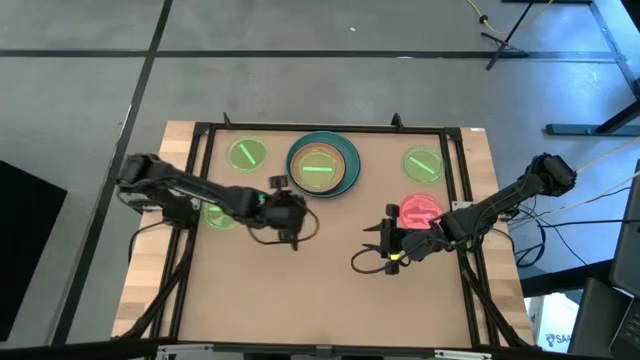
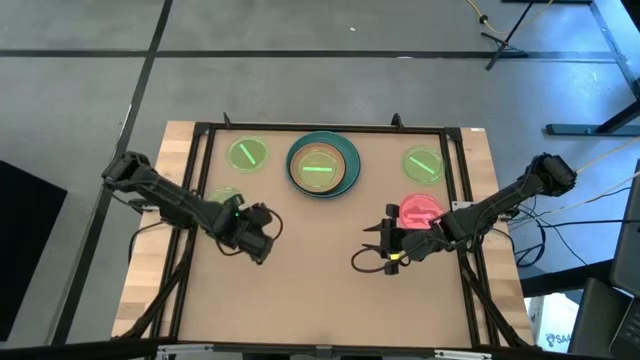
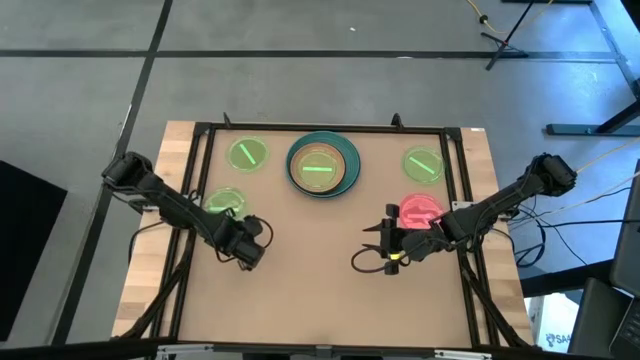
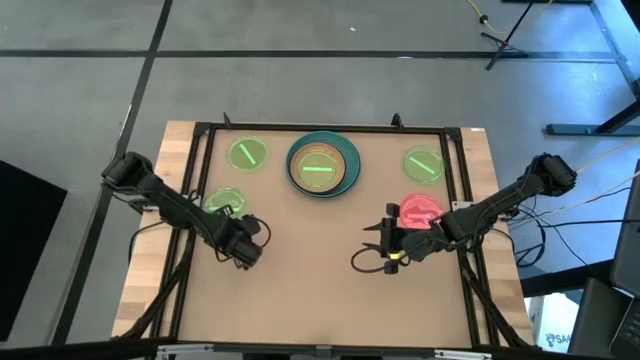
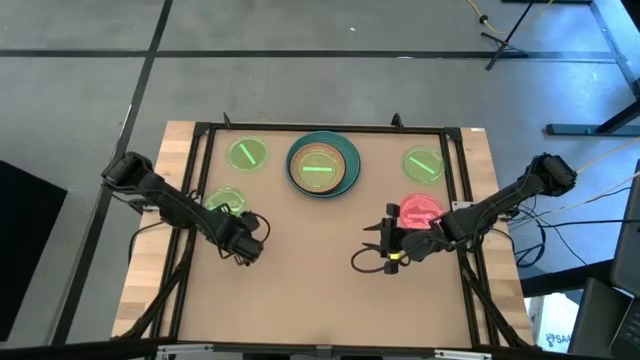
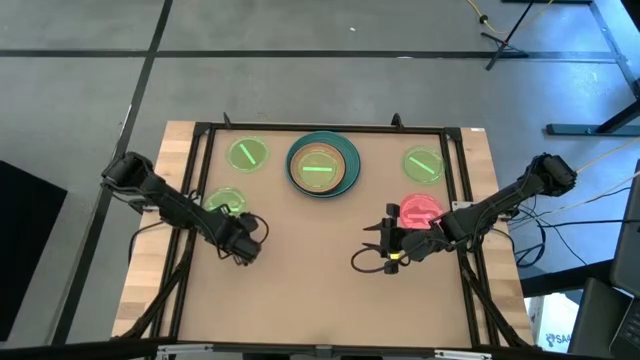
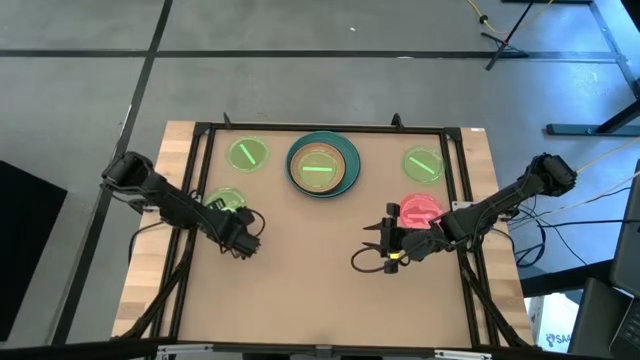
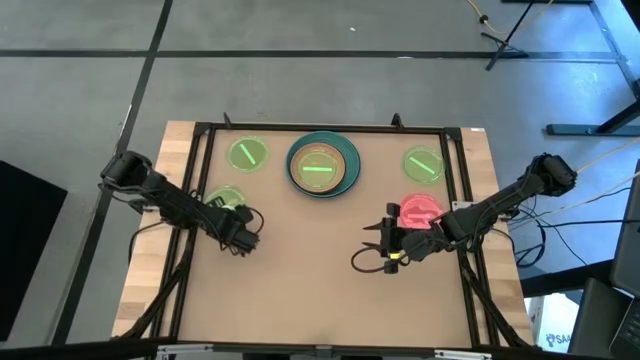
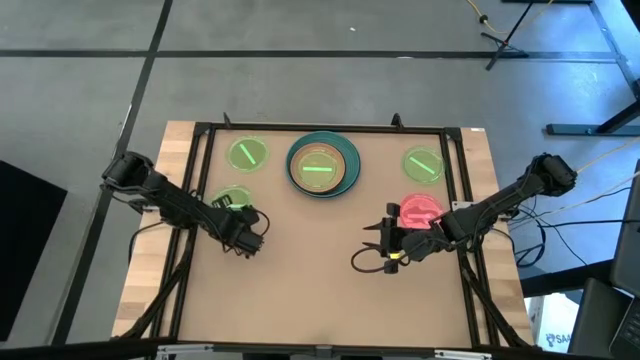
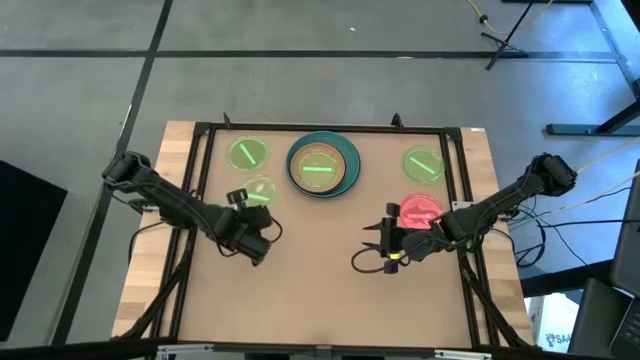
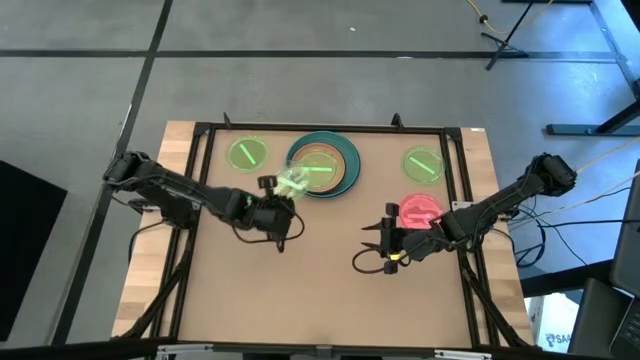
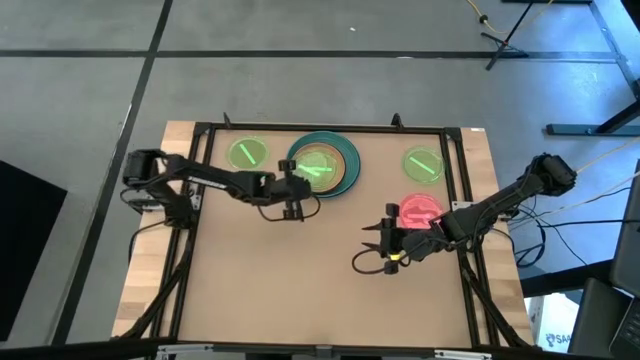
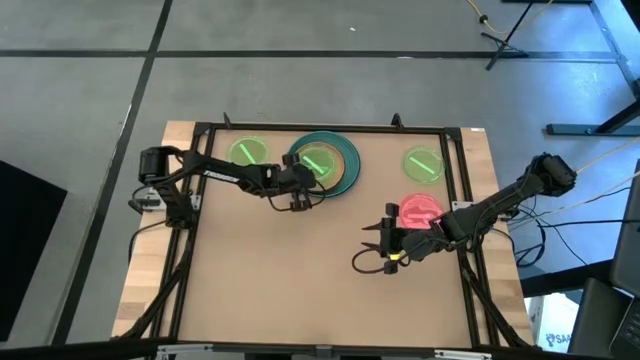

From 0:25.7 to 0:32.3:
Task: Stack plastic plates
Stack the light green plate on top of the light green plate

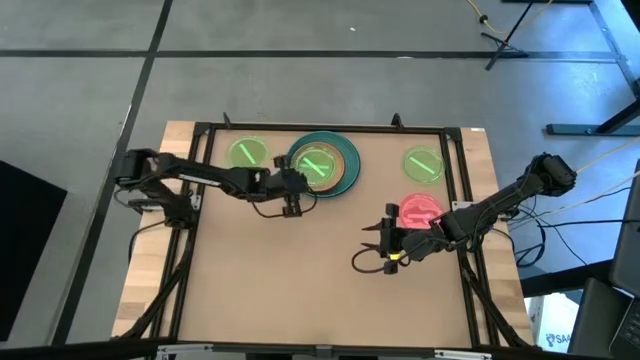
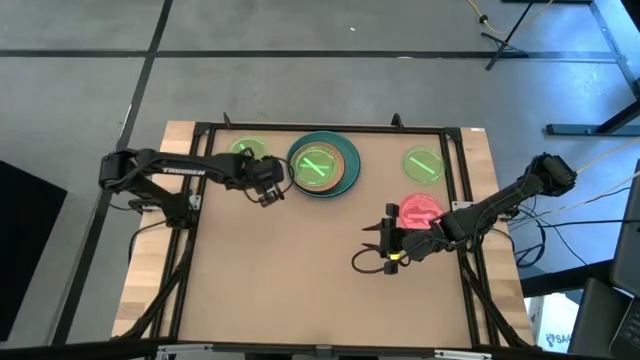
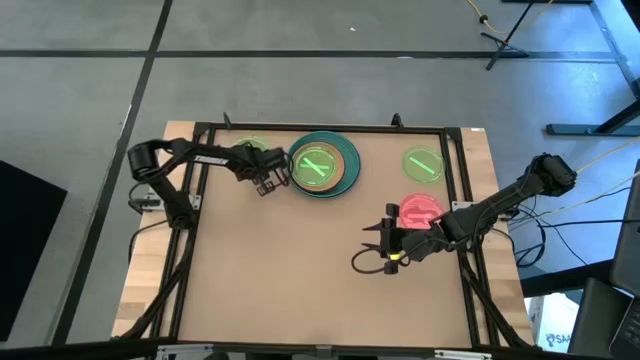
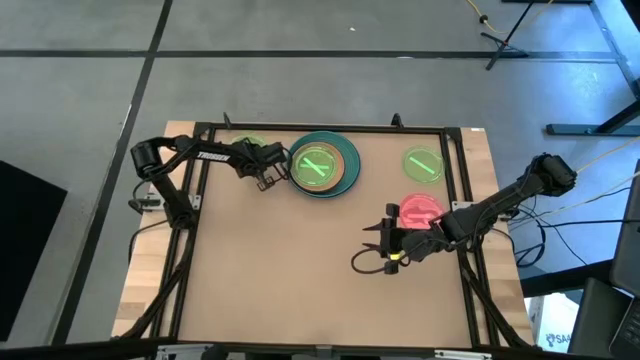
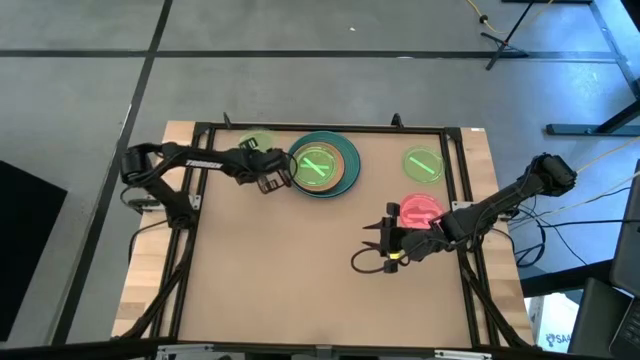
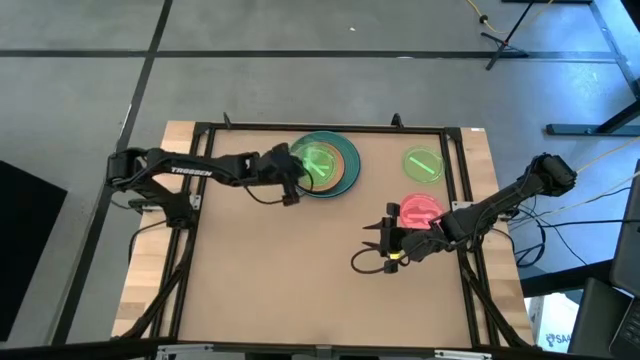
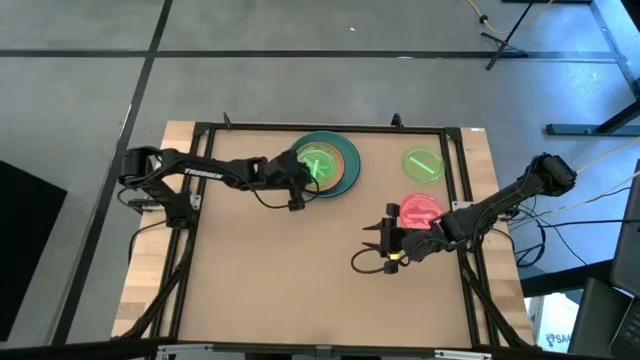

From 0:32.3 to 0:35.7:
Stack the light green plate on top of the light green plate

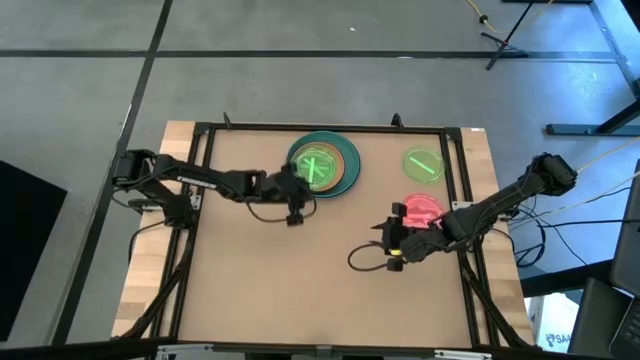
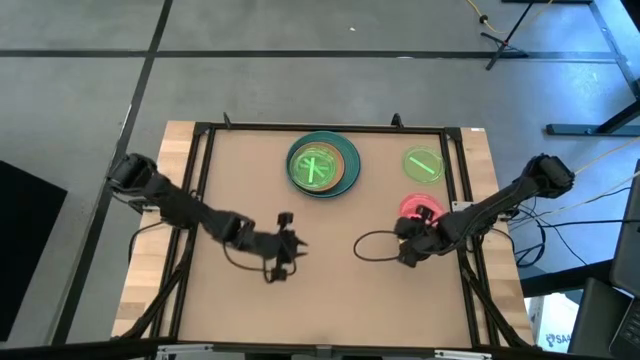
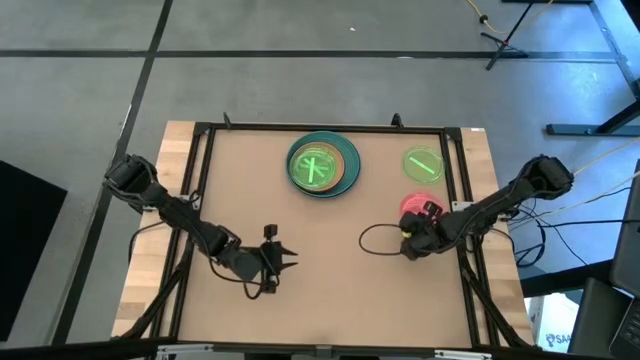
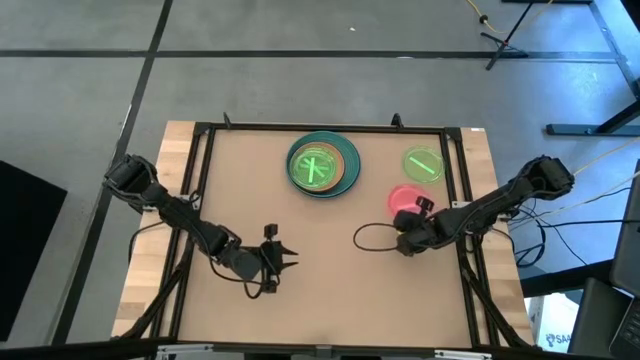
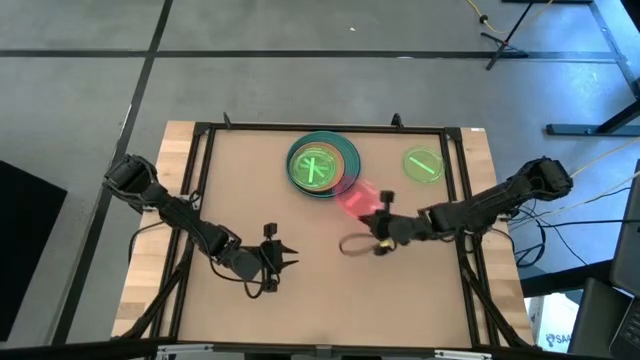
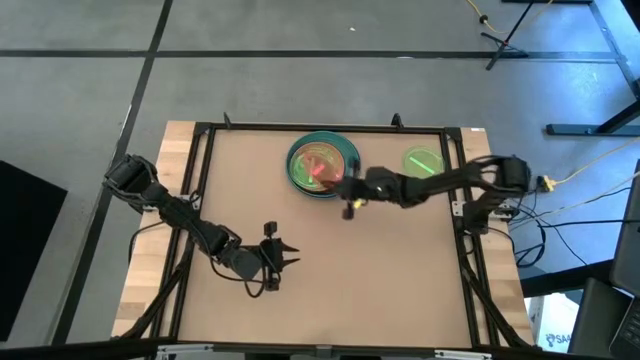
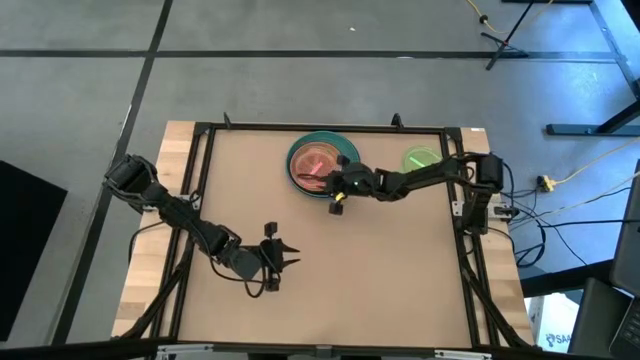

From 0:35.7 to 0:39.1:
Stack the pink plate on top of the light green plate

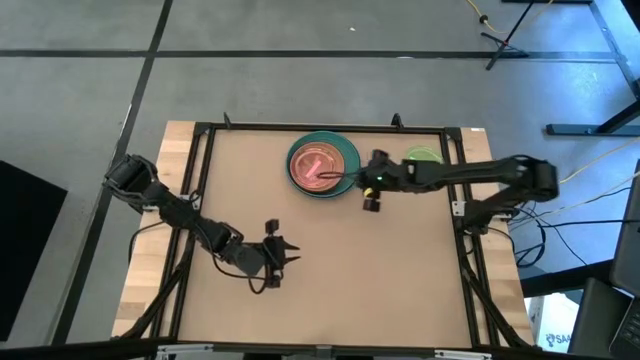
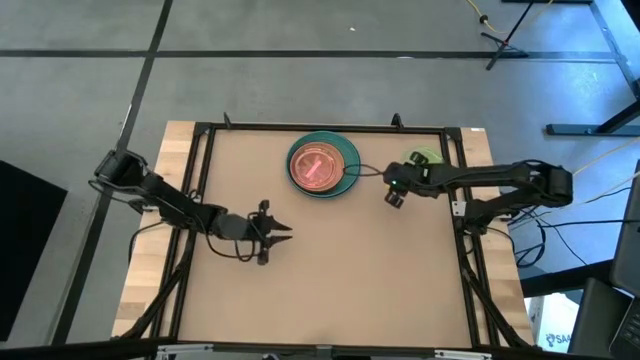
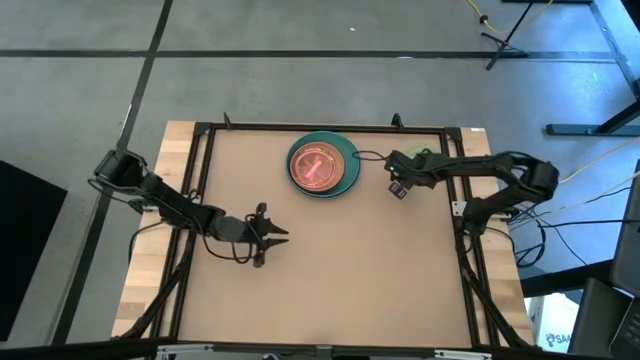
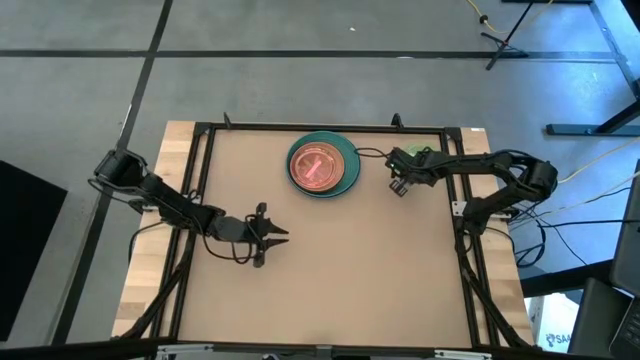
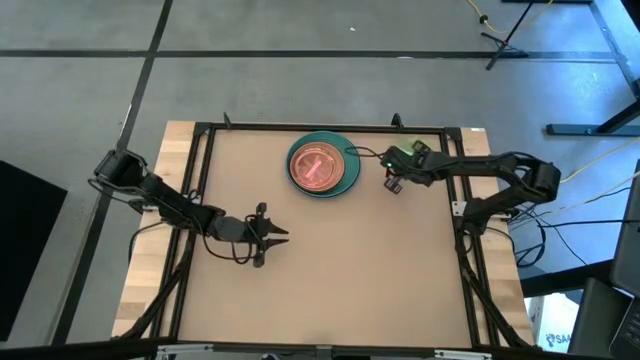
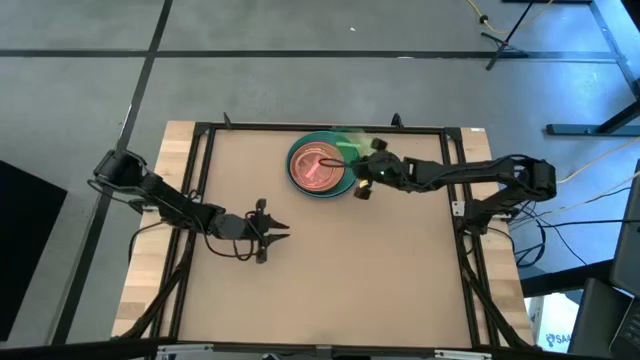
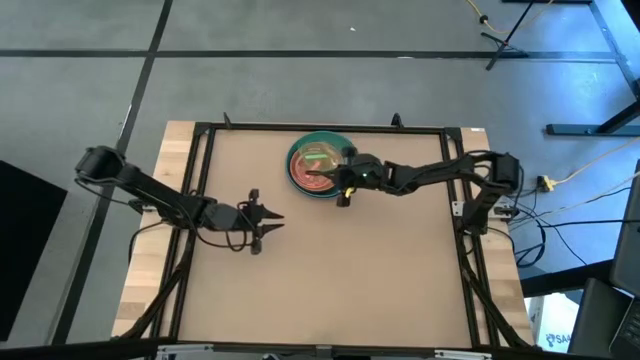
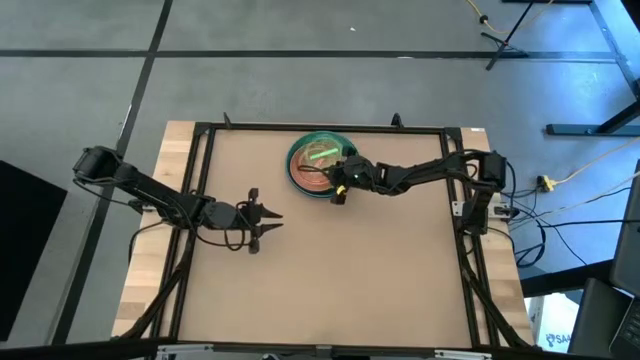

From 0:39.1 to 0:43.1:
Stack the light green plate on top of the pink plate

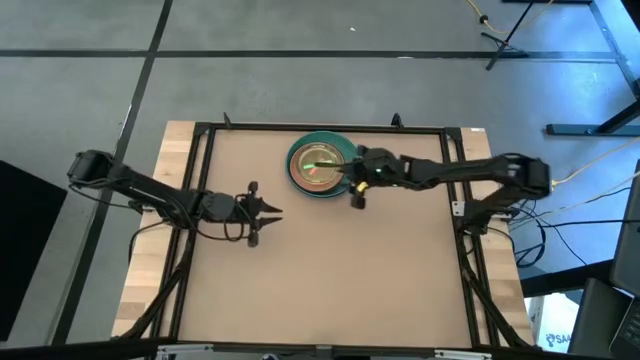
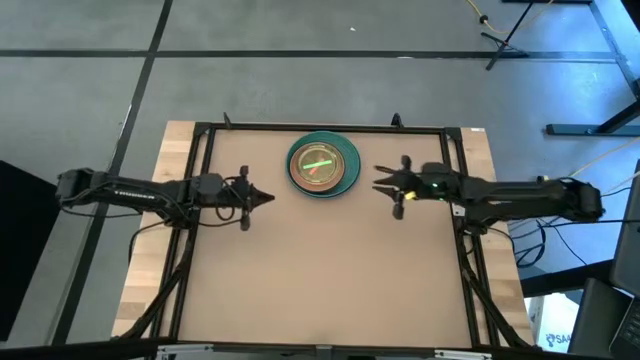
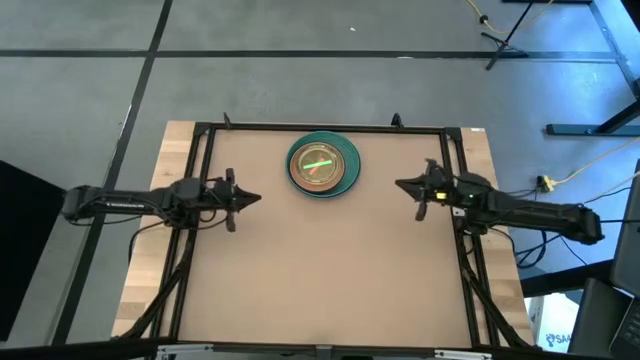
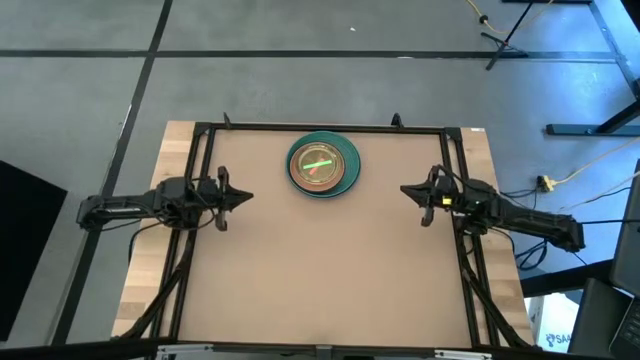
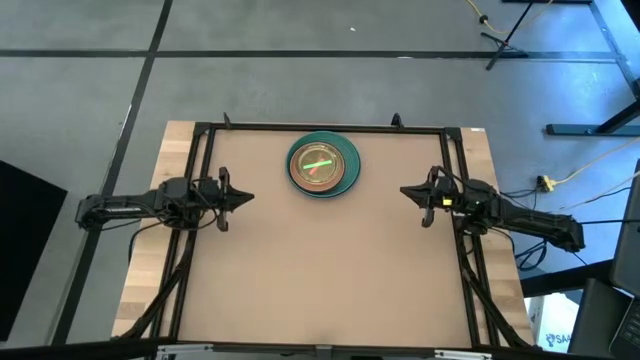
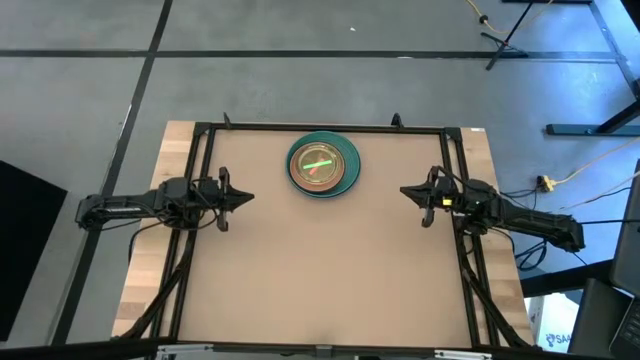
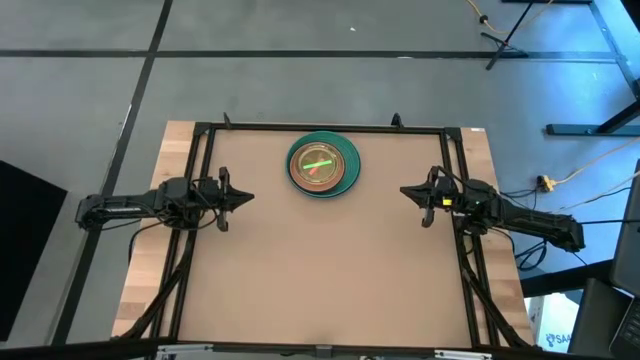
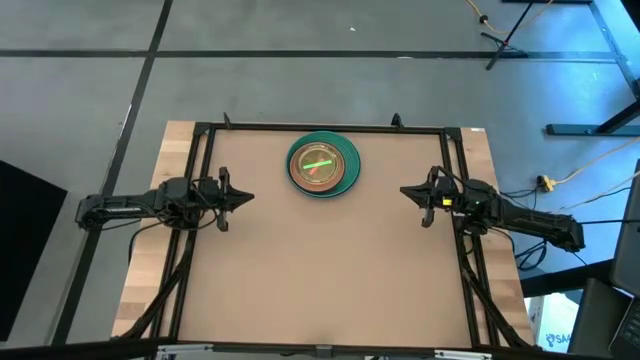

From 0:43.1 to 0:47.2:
Return to Home Position
